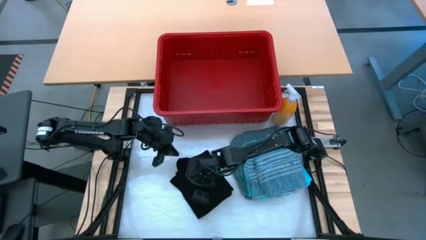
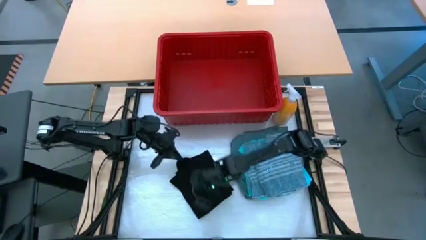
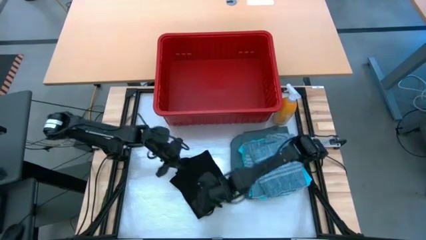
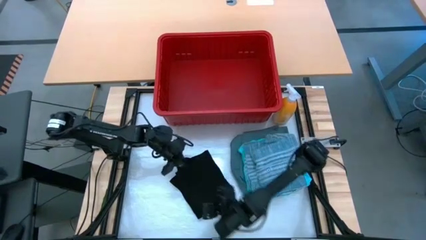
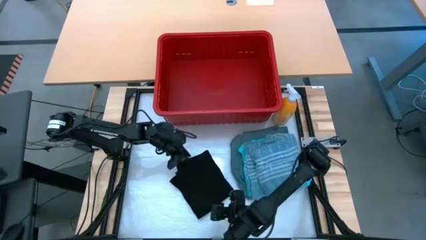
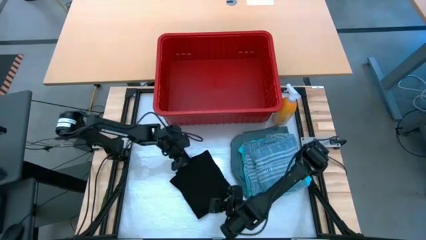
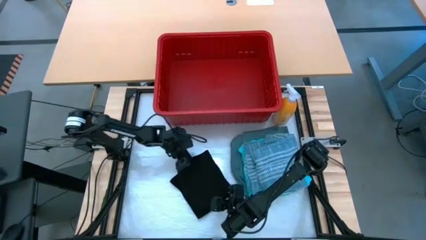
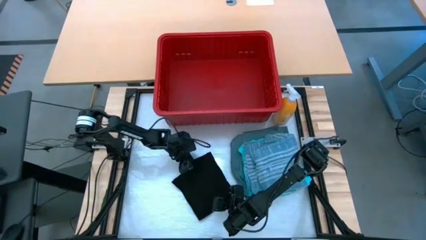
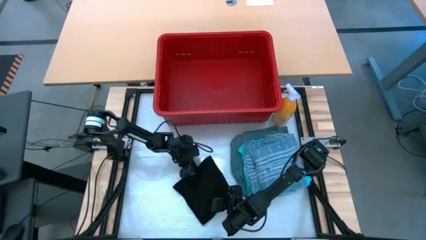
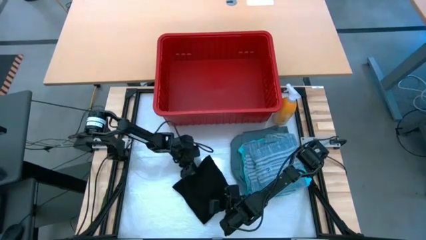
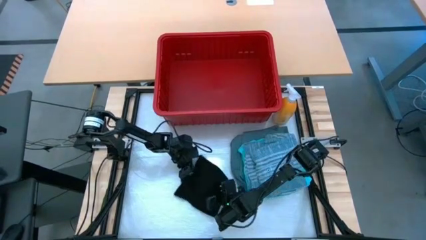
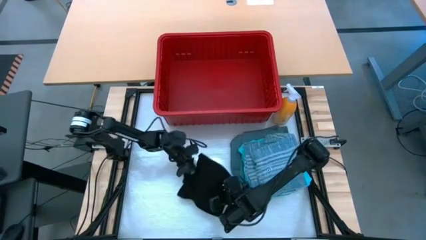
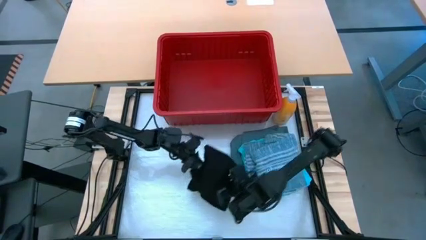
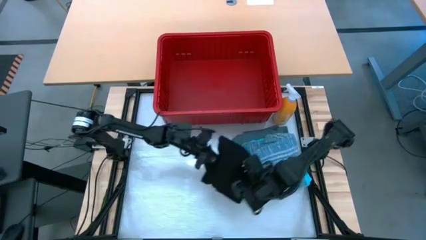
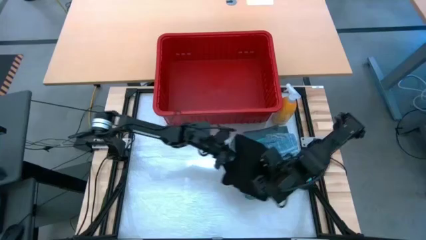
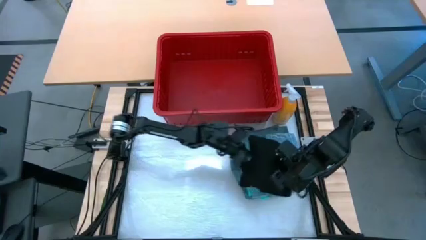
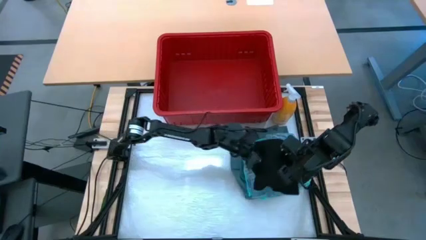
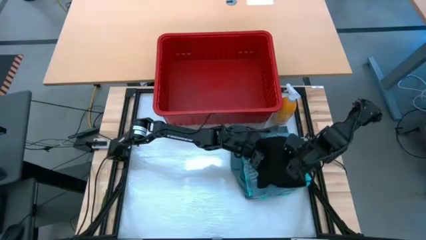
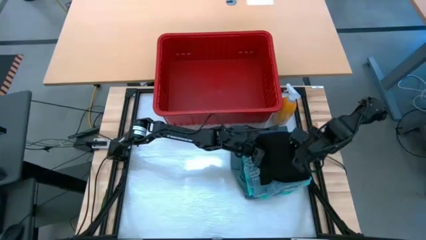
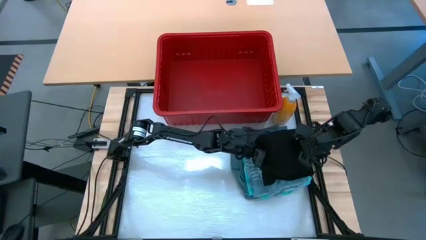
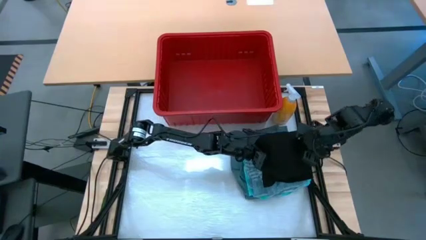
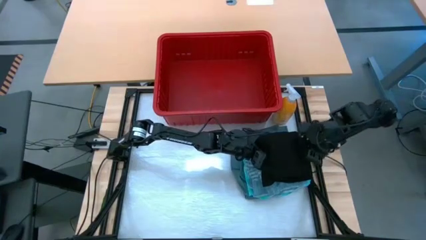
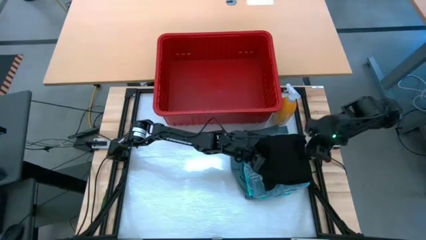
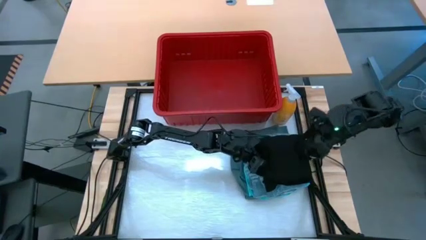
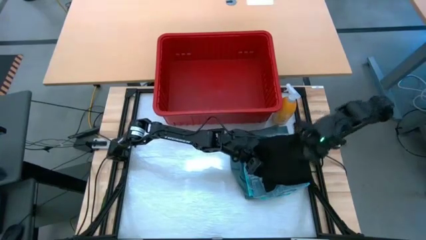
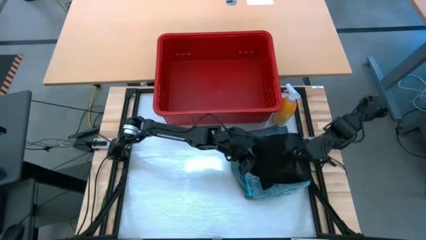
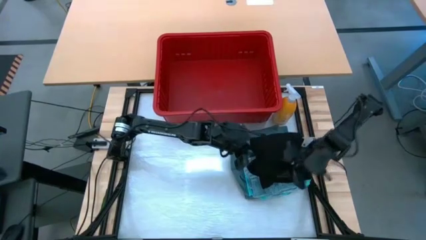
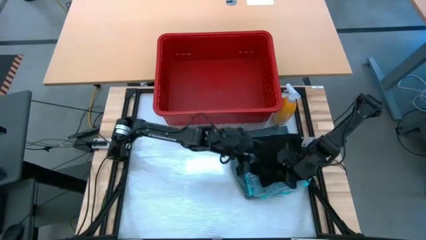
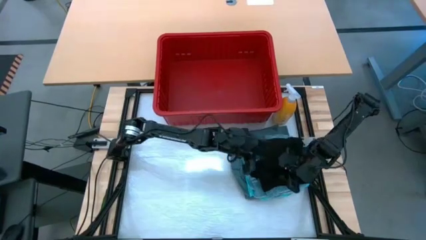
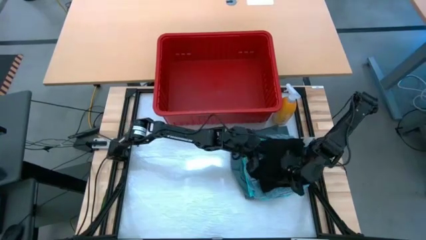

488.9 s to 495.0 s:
Task: Fold Laundry from Bin
Stack the black shirt on top of the blue shirt

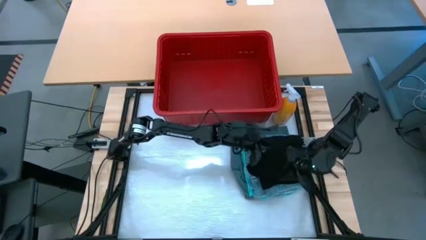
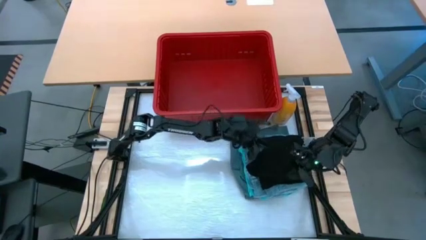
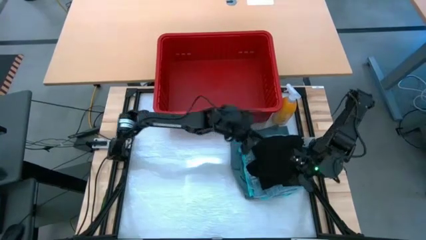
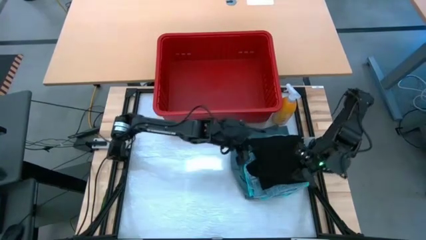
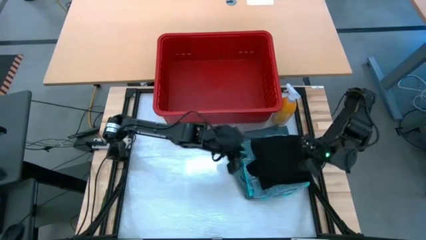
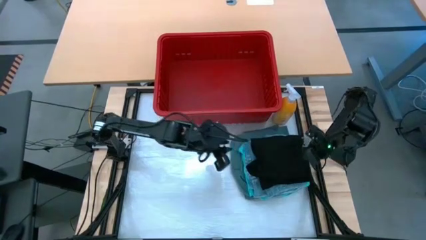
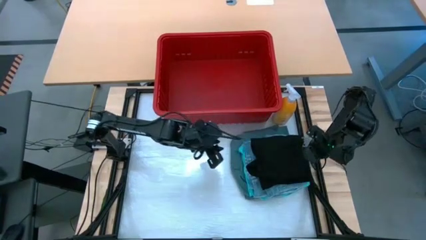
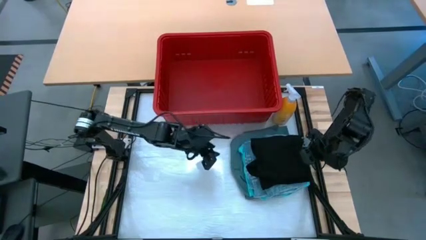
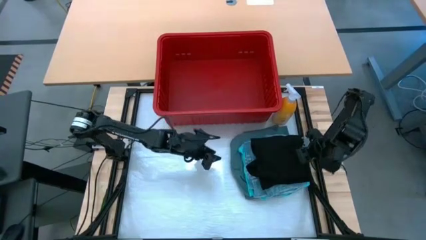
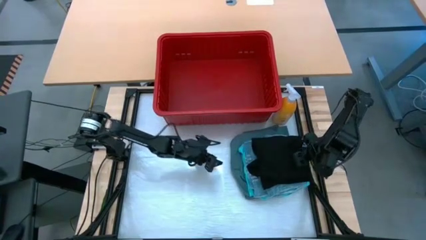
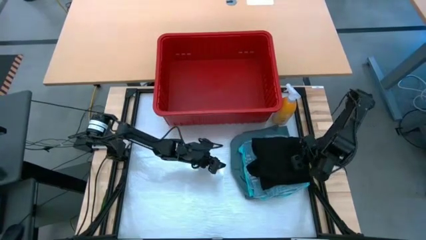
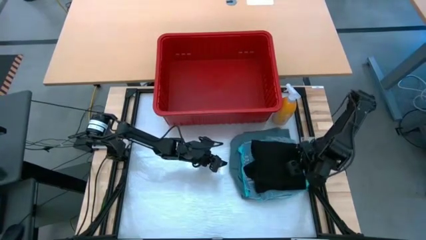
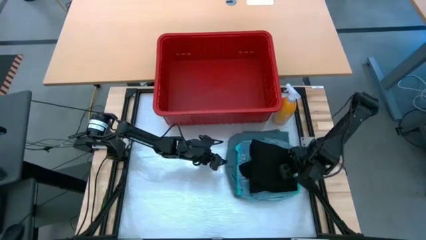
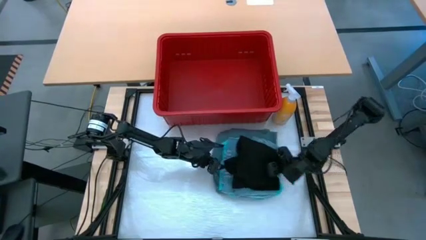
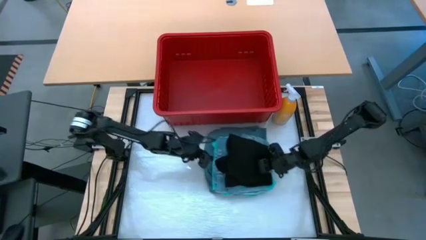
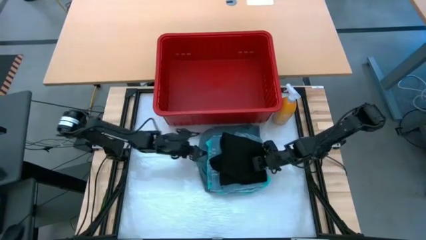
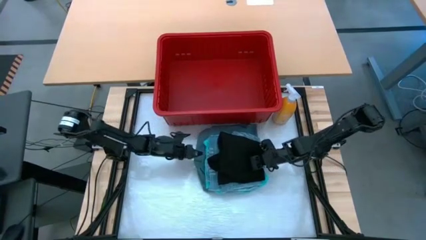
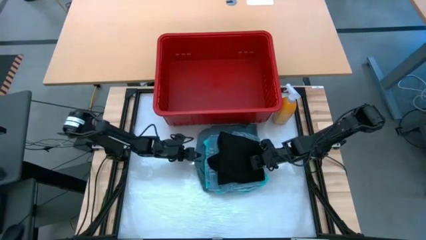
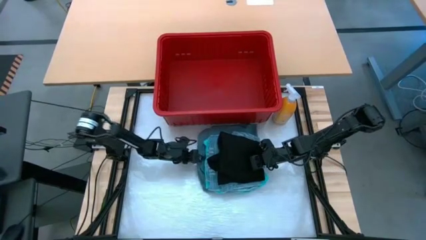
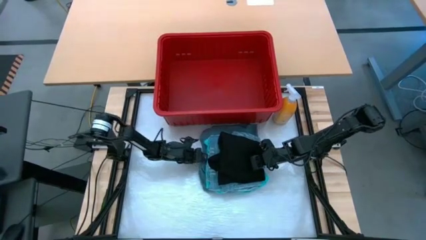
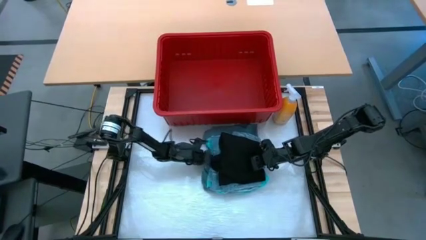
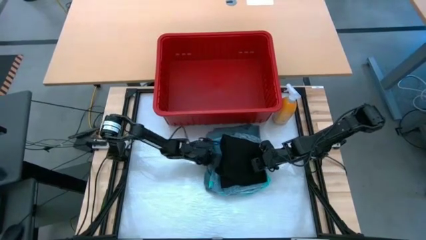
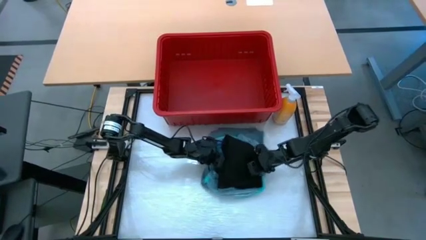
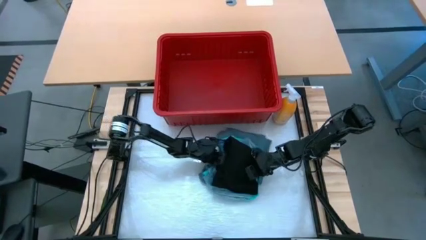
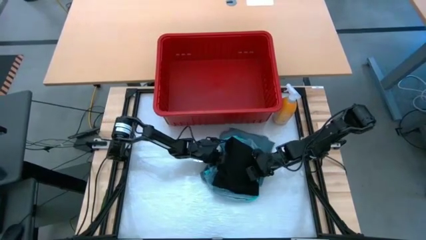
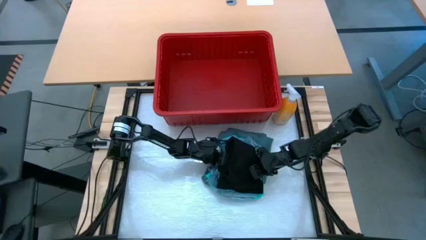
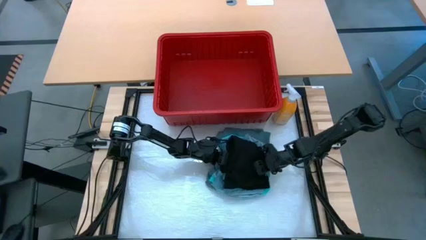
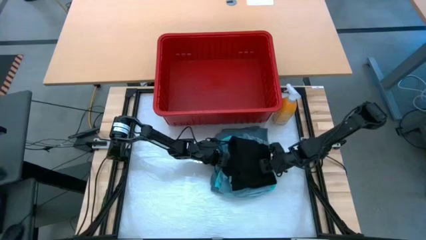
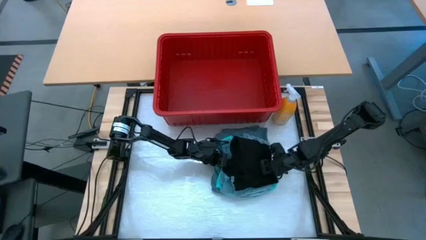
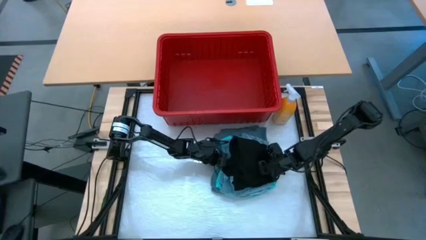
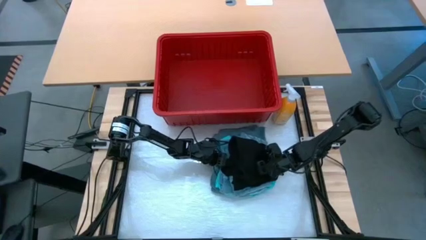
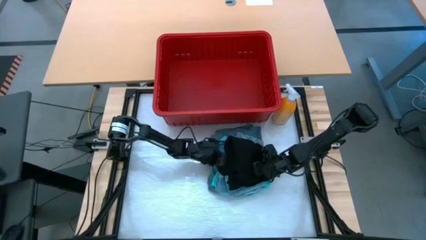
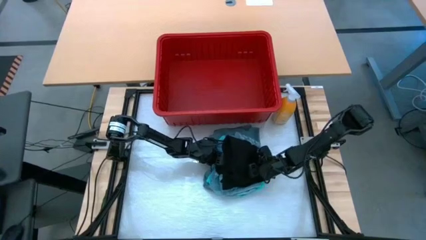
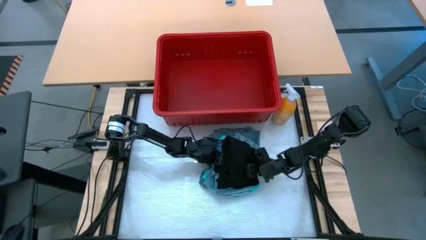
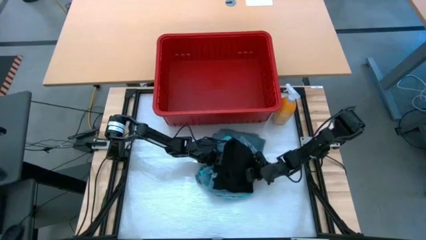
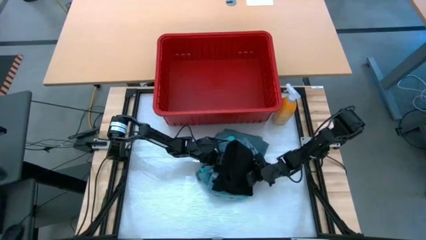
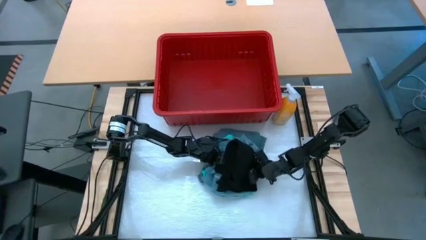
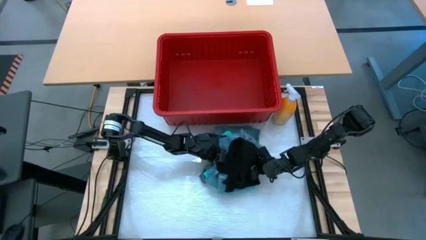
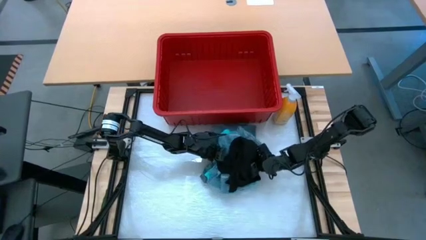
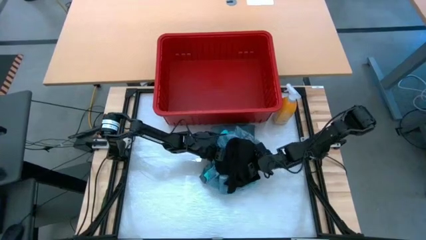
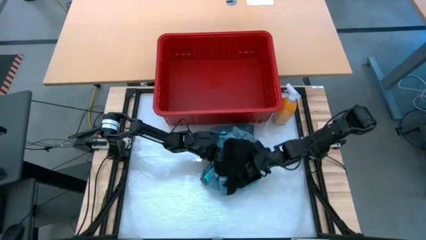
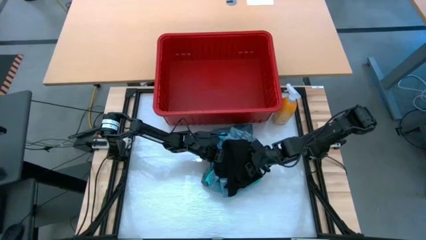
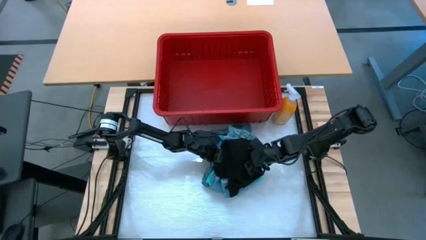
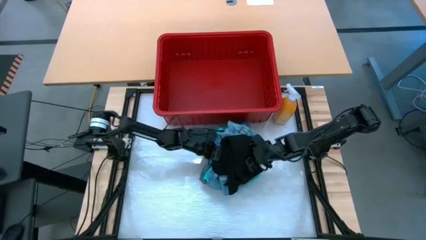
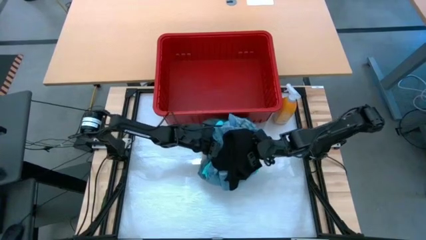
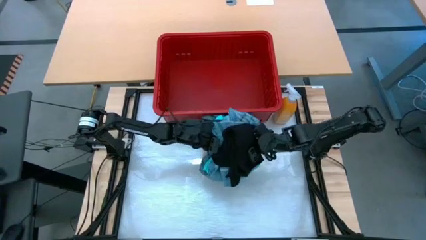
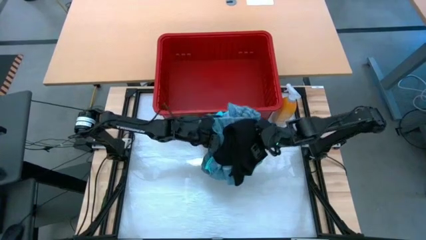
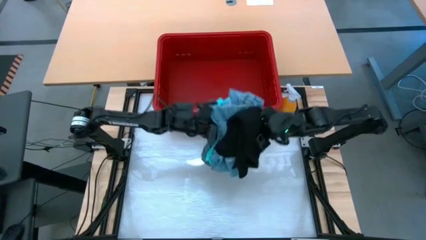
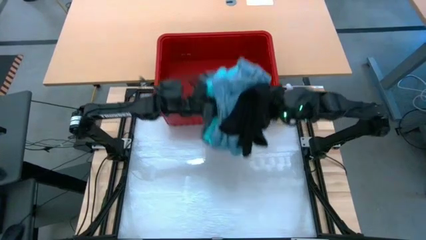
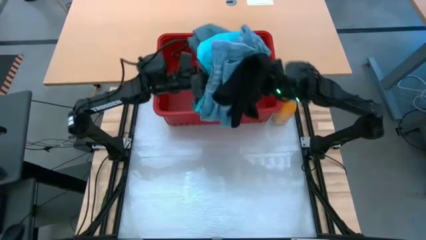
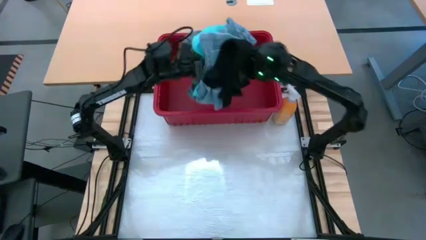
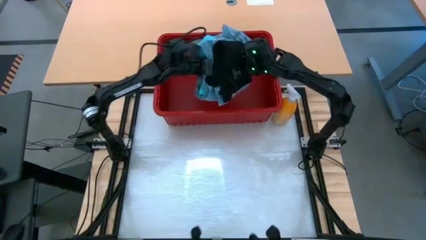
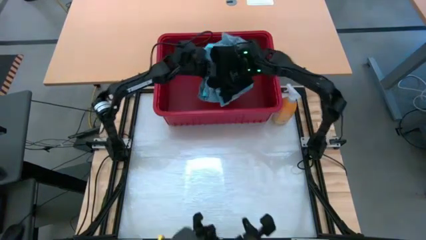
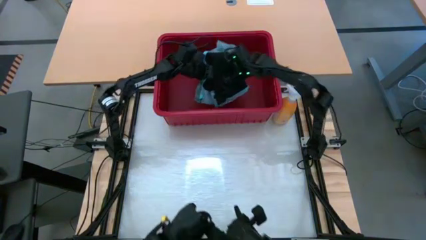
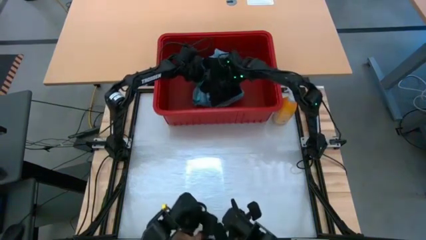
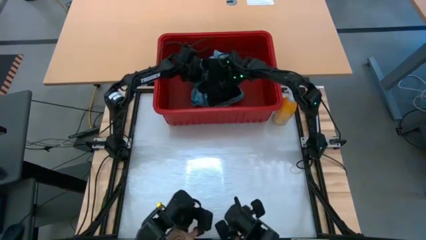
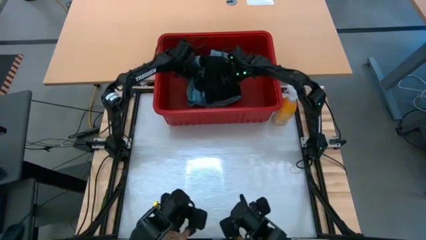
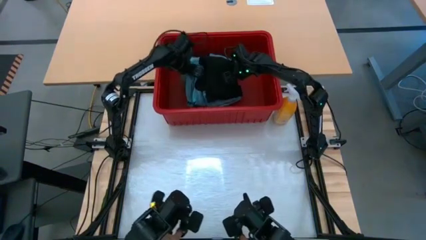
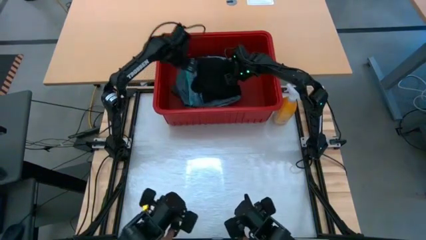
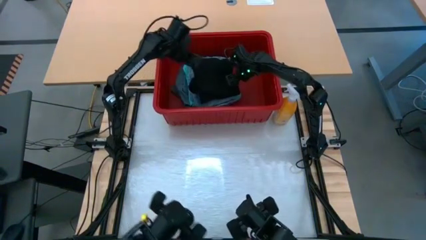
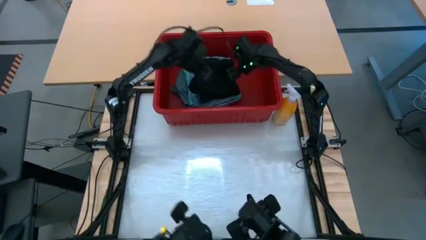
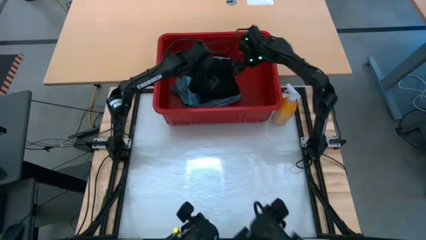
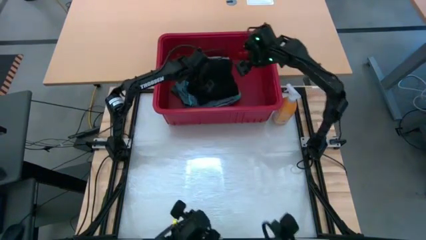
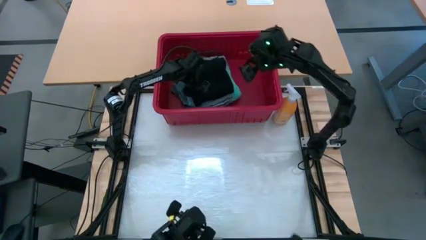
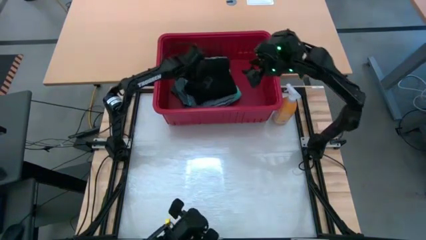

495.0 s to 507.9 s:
Put the stacked folded clothes into the red bin
